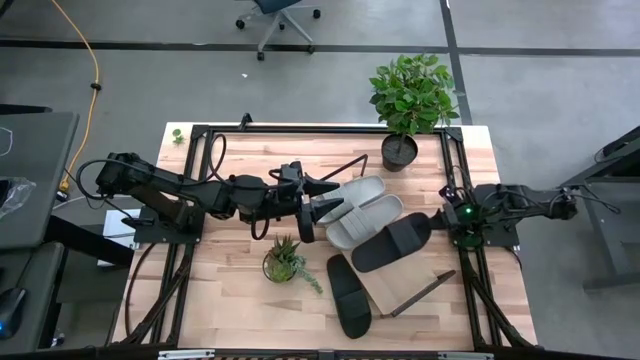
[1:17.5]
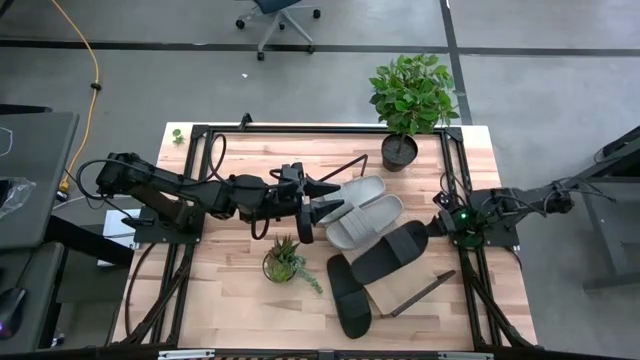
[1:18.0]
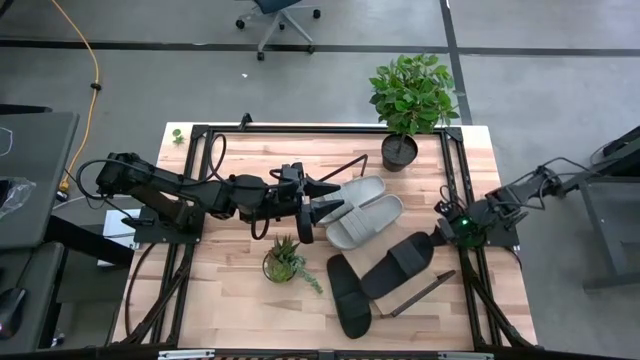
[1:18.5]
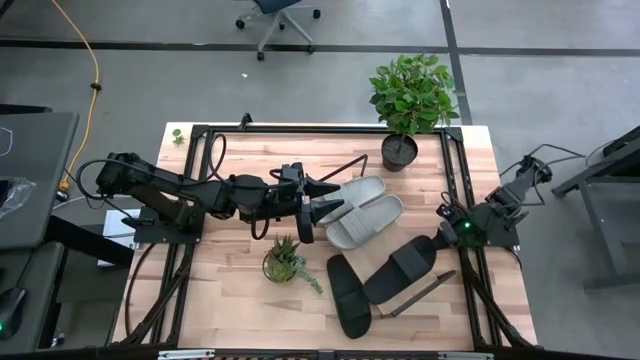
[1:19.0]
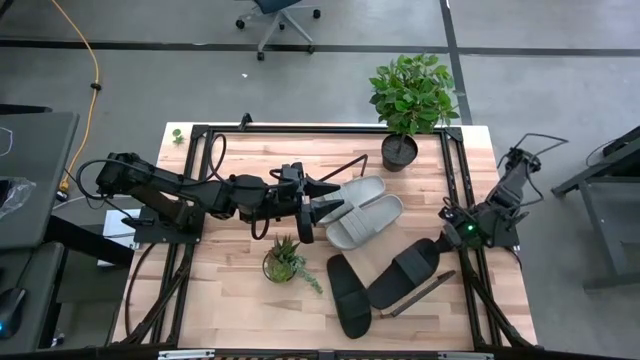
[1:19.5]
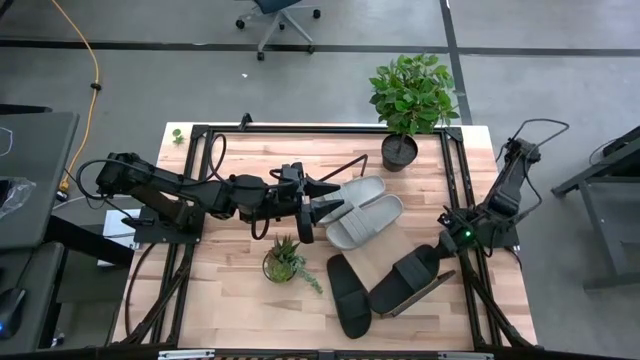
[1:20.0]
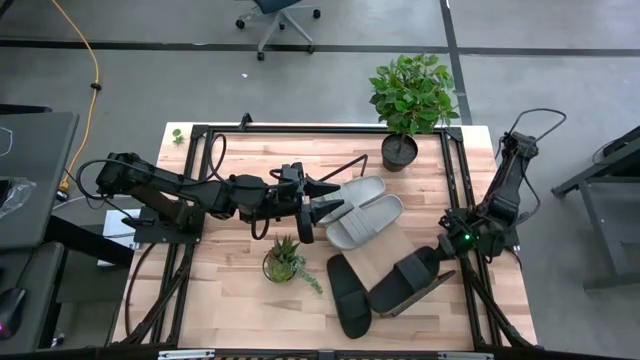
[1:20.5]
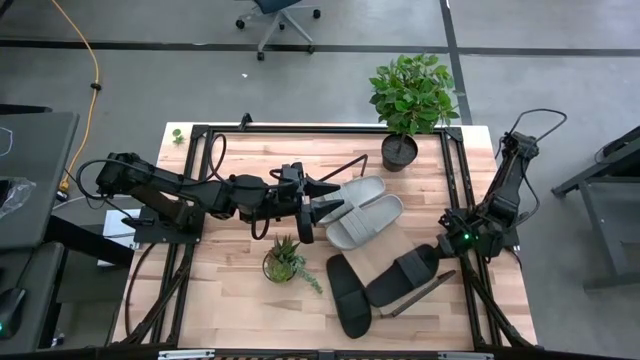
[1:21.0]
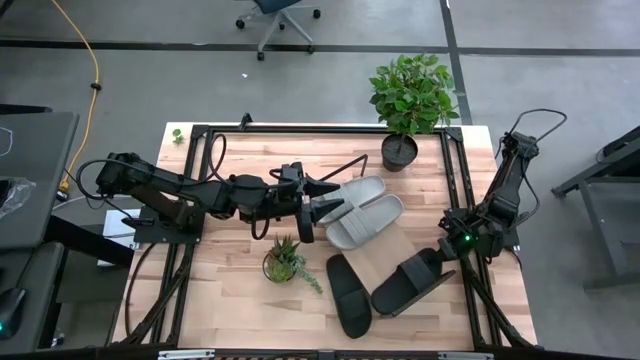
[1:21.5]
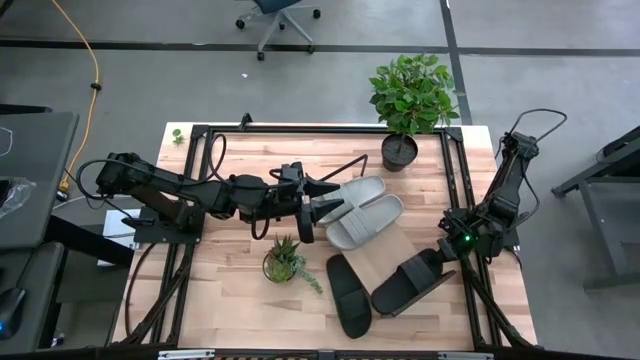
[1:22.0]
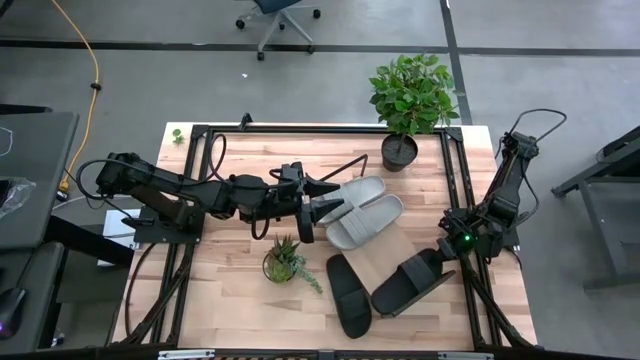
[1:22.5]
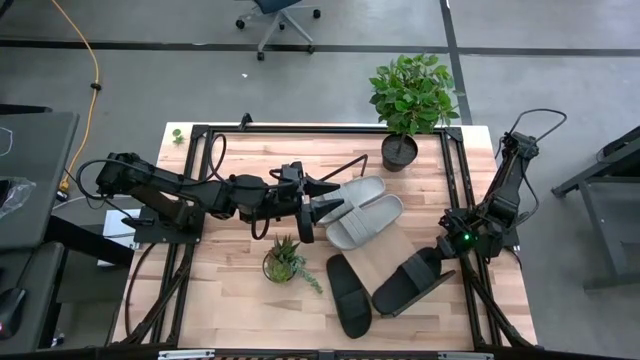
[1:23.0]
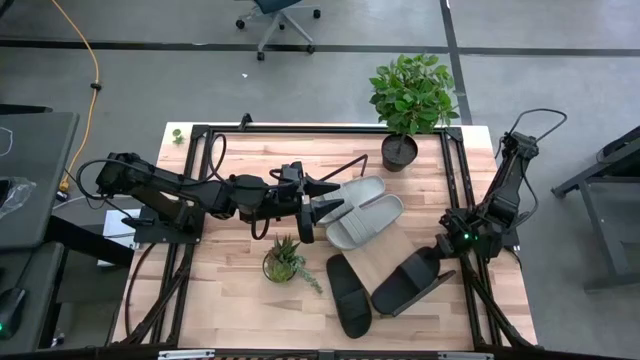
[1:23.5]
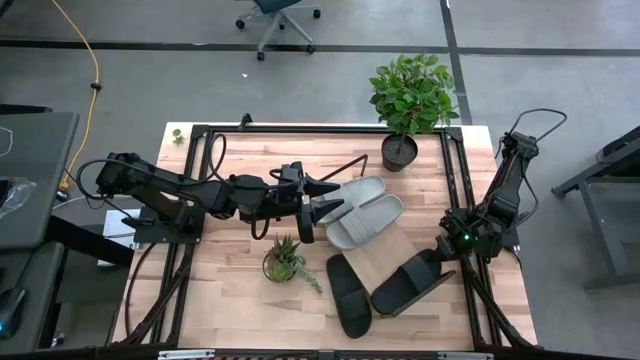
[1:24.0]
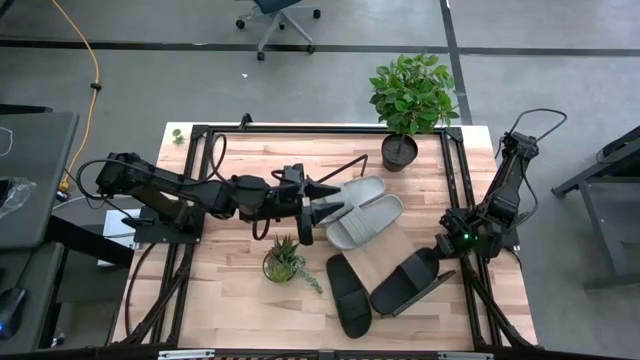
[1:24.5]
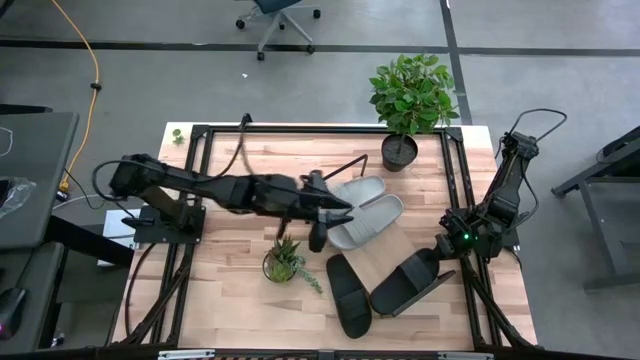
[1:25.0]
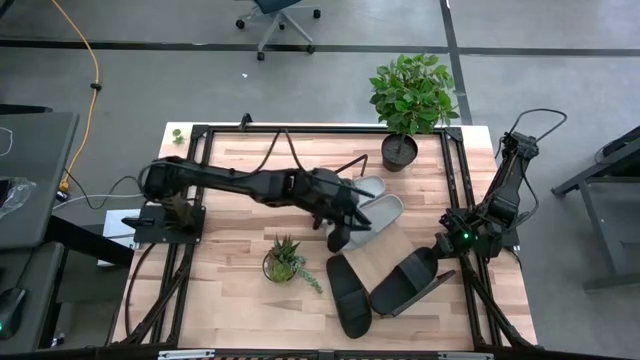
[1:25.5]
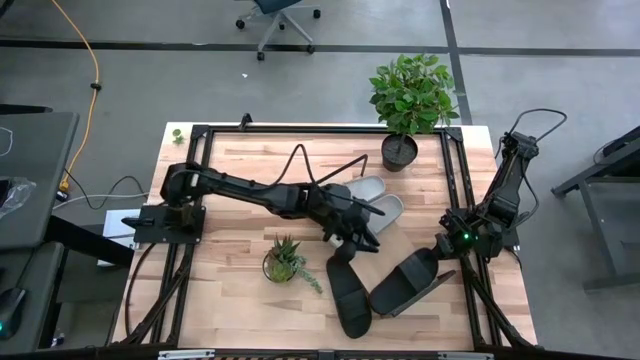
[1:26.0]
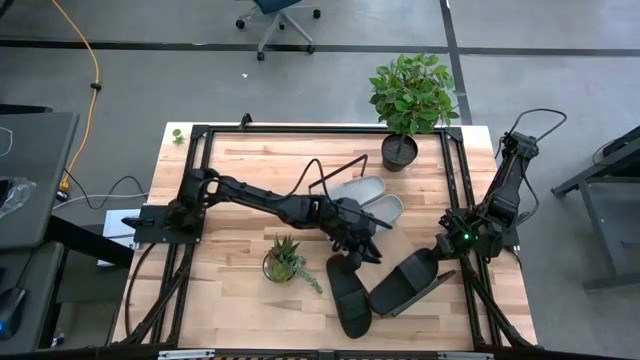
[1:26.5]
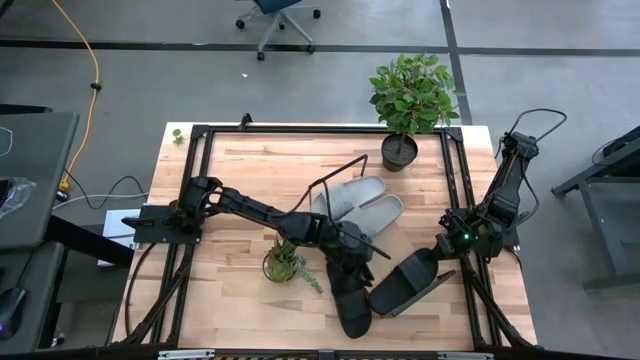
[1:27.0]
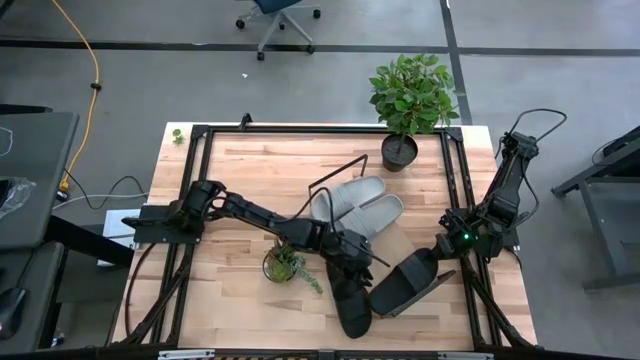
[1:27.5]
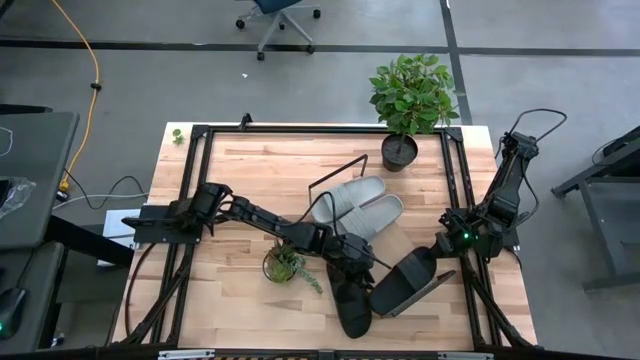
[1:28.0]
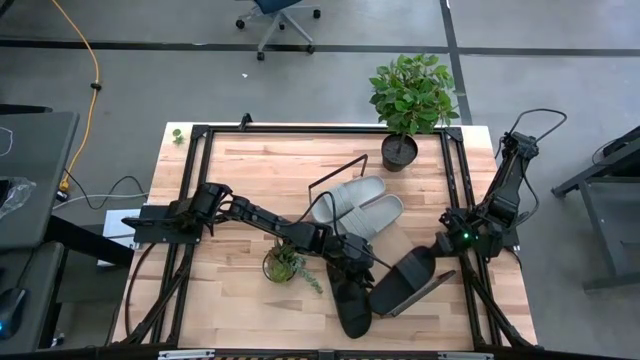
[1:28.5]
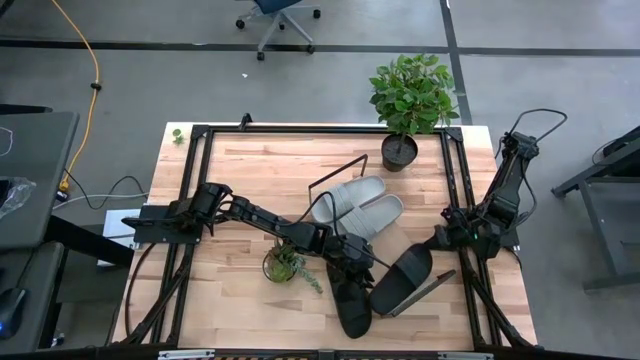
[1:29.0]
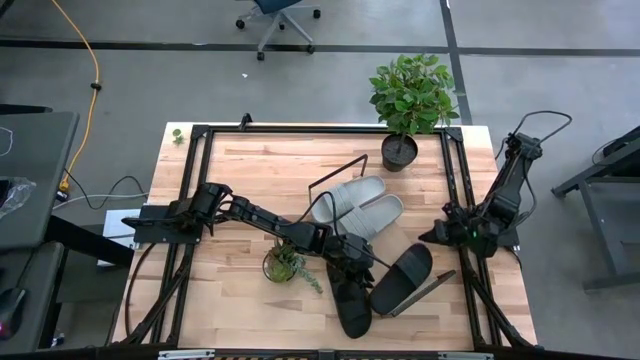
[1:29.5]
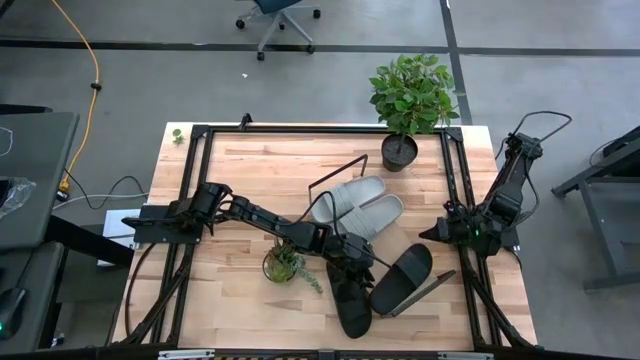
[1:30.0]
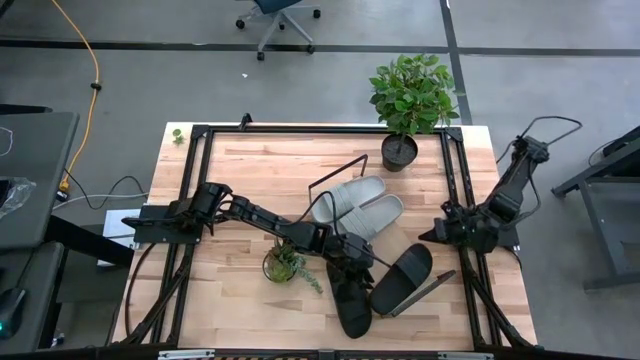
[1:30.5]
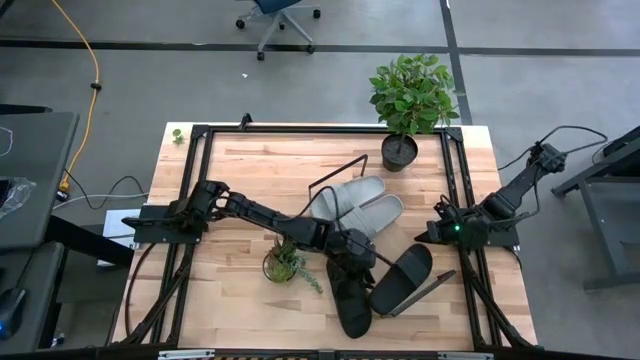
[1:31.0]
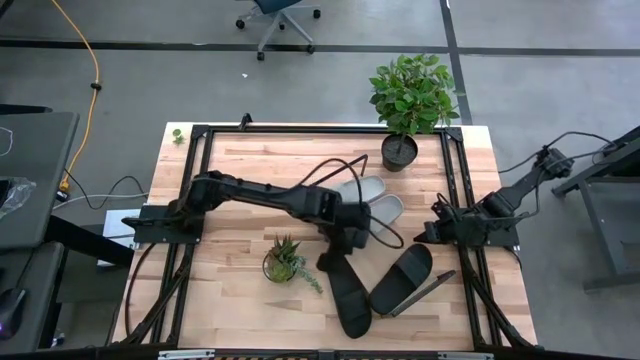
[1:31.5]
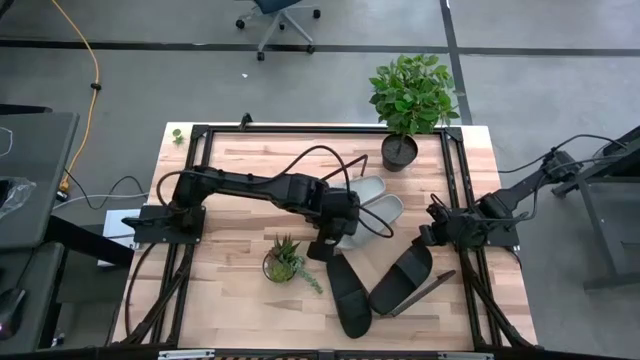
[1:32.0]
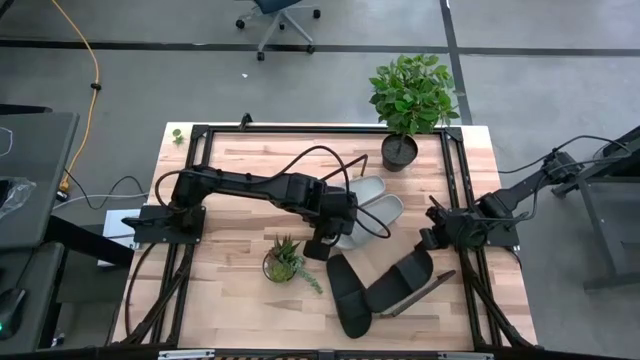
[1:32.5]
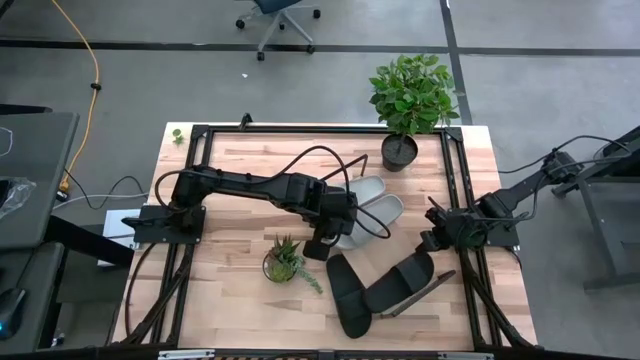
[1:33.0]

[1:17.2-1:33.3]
Task: Pick and place slides into the shelf
Put the top black slide on the shelf
